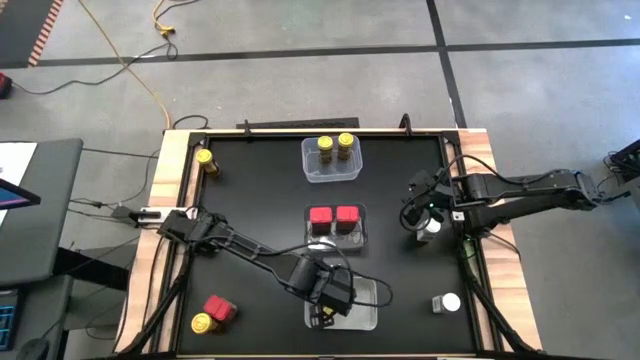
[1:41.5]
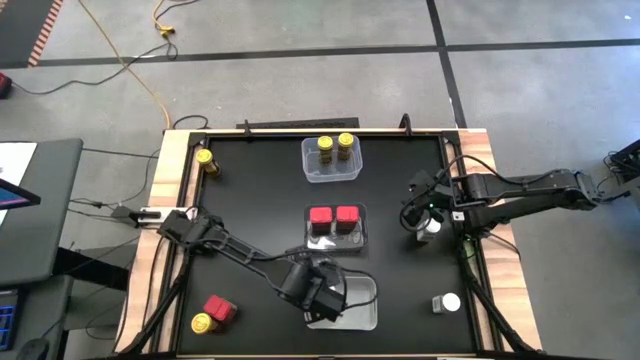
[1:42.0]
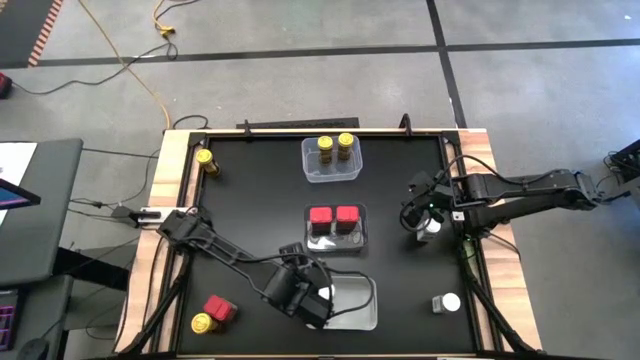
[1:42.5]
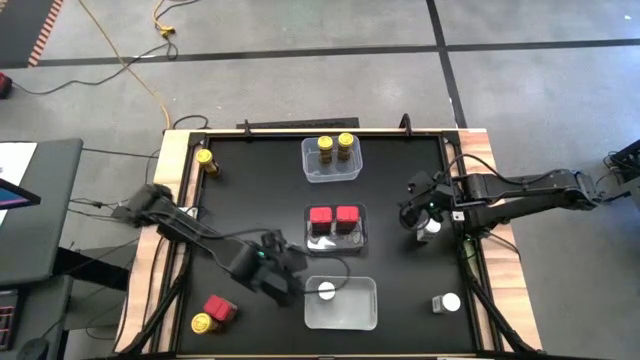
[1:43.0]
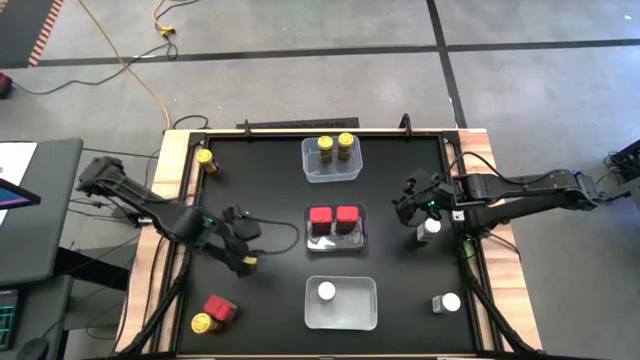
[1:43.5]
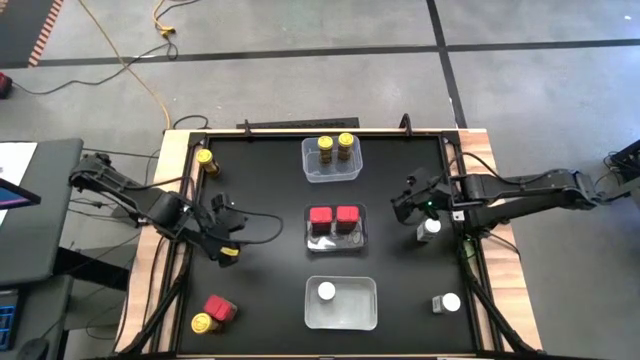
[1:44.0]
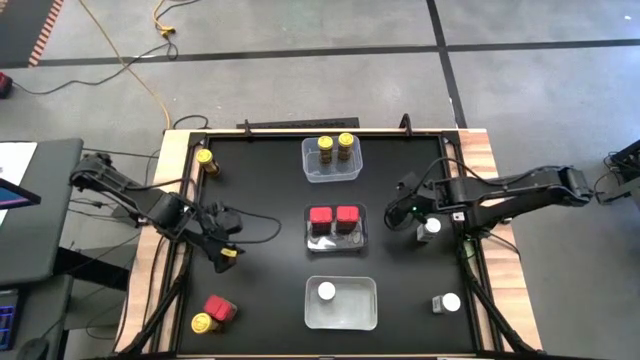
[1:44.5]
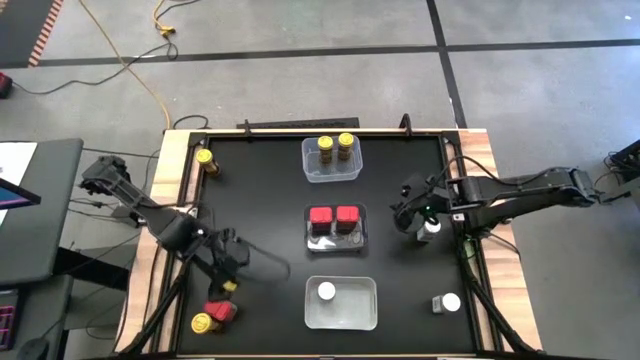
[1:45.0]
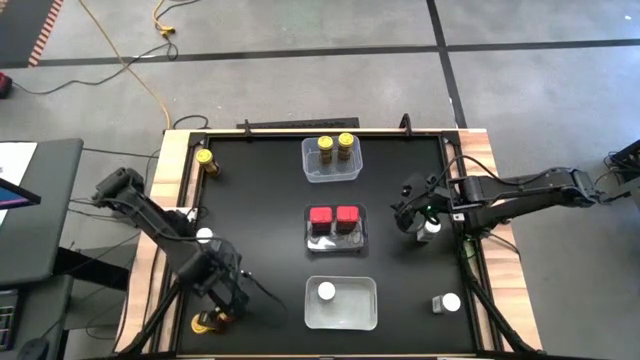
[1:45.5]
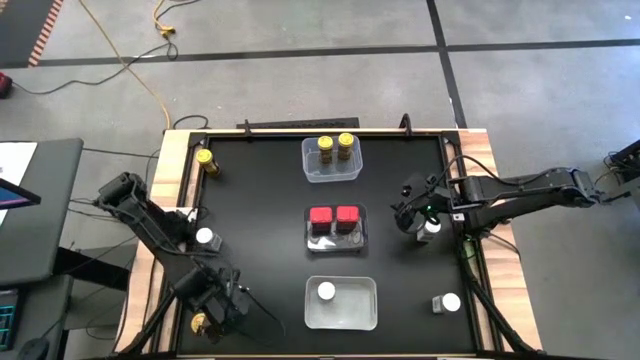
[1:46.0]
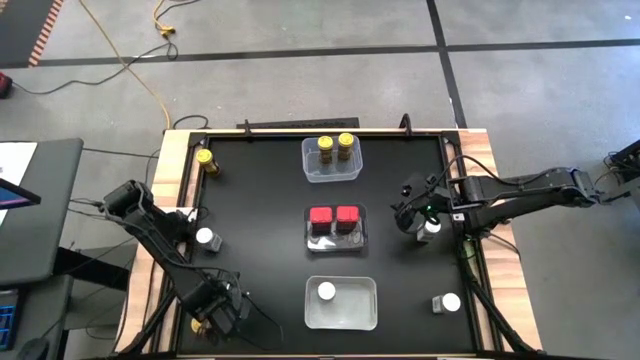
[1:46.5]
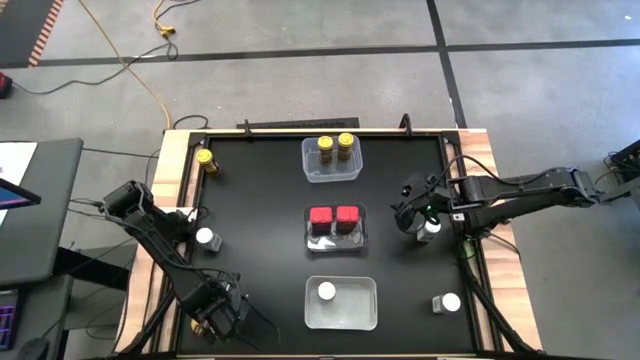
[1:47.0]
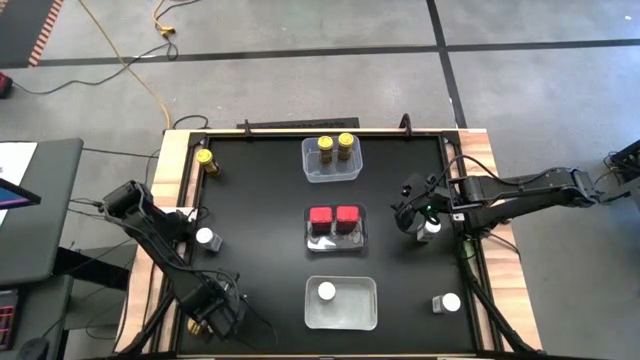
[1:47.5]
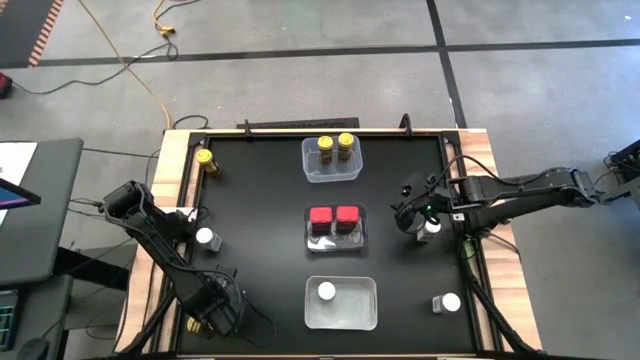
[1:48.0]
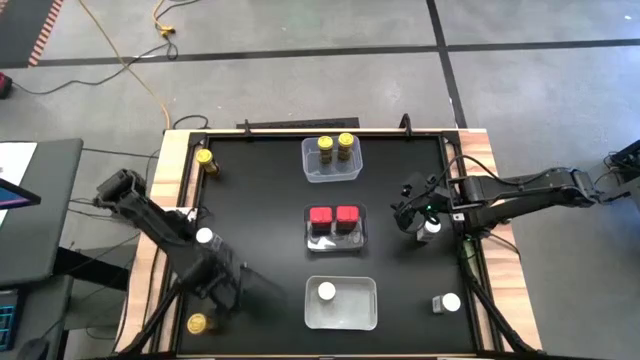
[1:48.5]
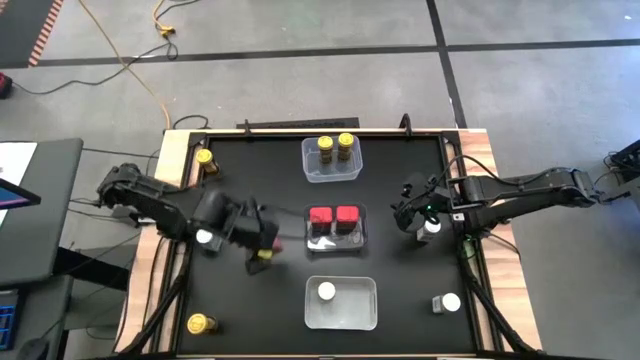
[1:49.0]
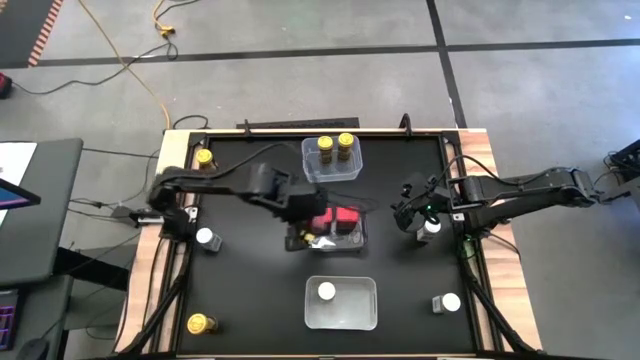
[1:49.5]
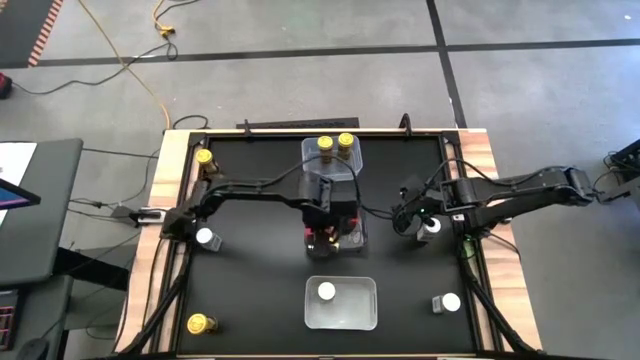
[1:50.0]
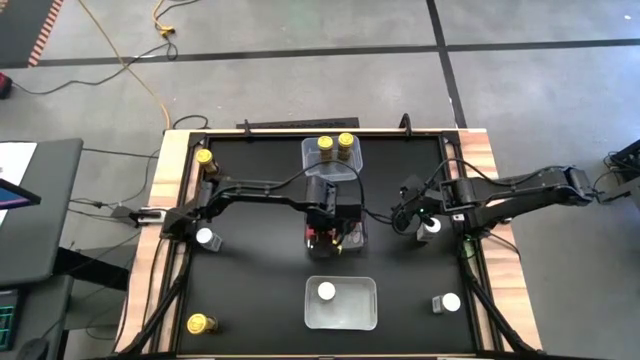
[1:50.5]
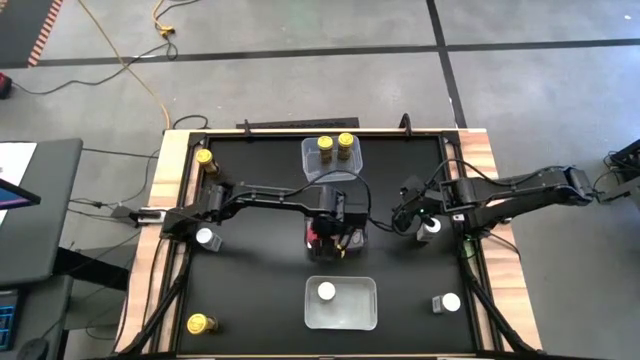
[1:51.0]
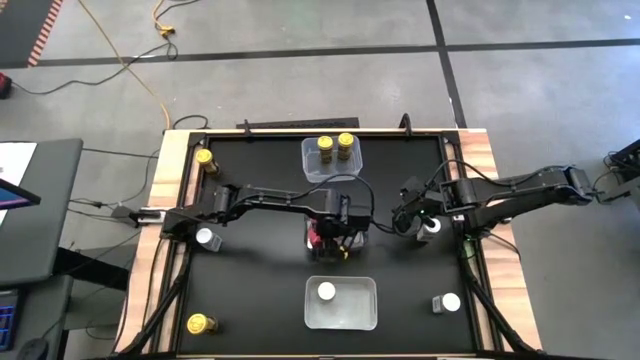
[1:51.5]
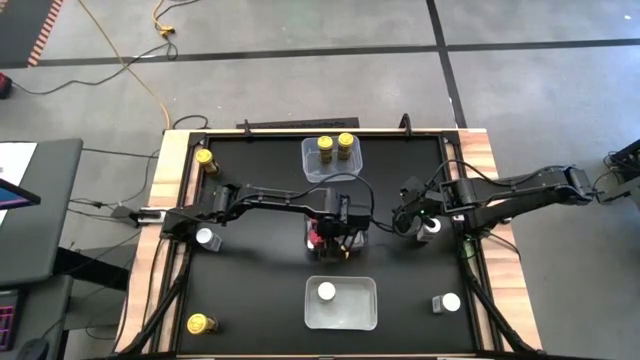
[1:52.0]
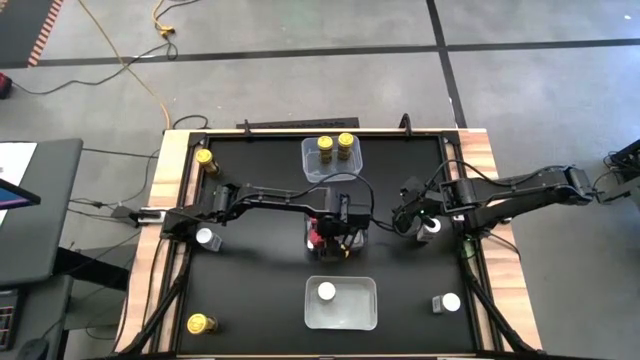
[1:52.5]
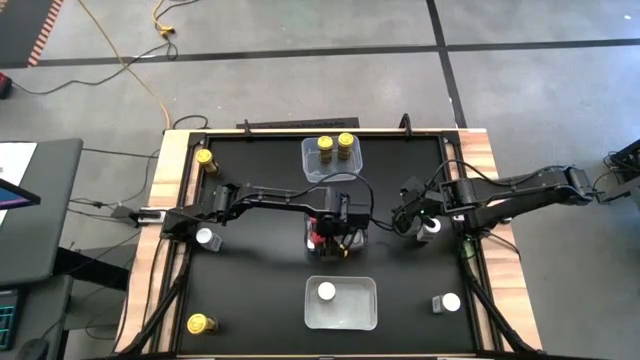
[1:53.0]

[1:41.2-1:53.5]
Task: Sort spices by type
Put the red seasoning can into the black bin

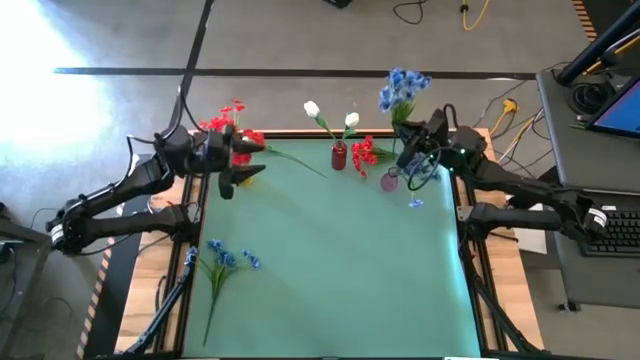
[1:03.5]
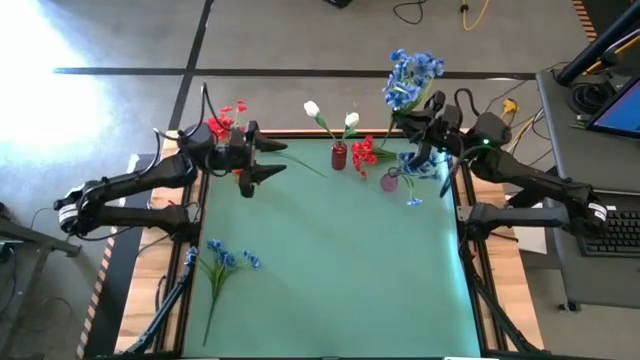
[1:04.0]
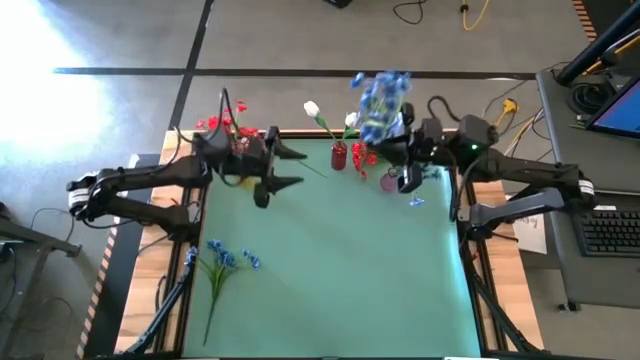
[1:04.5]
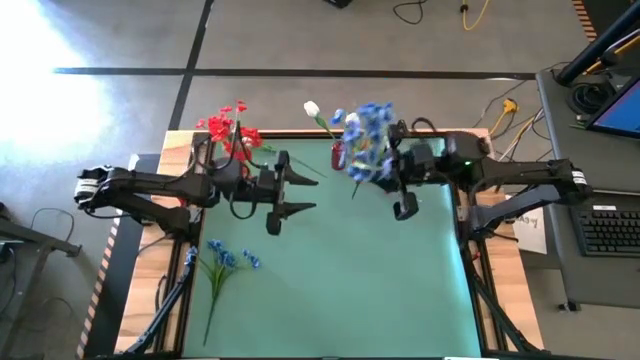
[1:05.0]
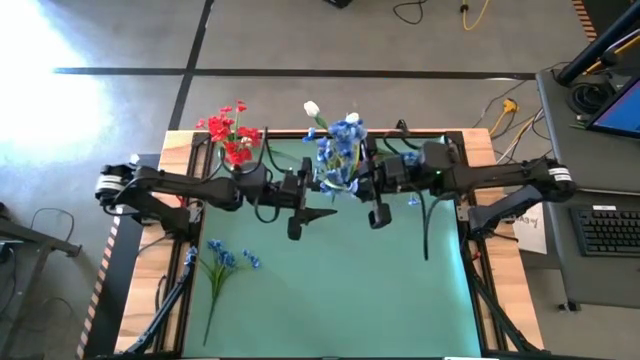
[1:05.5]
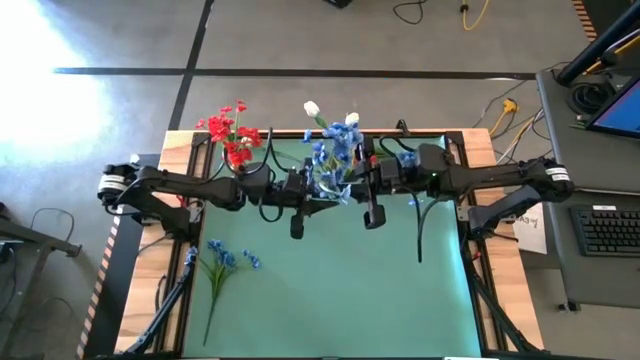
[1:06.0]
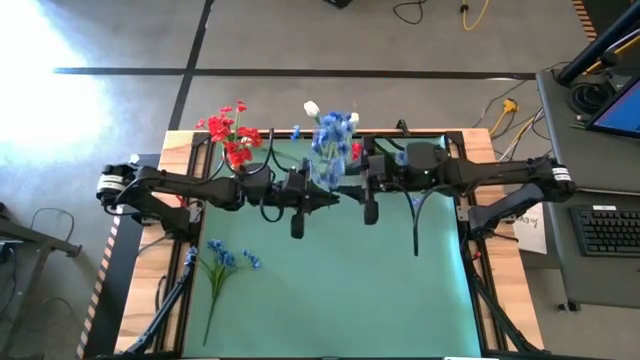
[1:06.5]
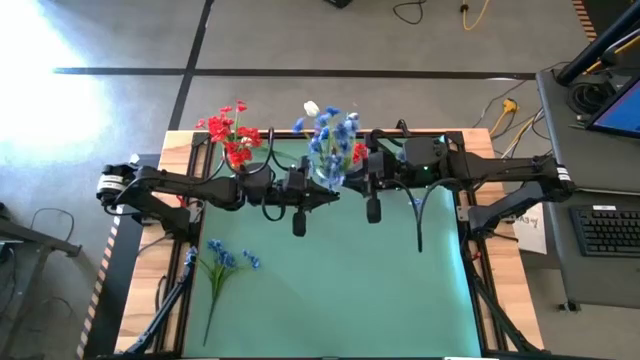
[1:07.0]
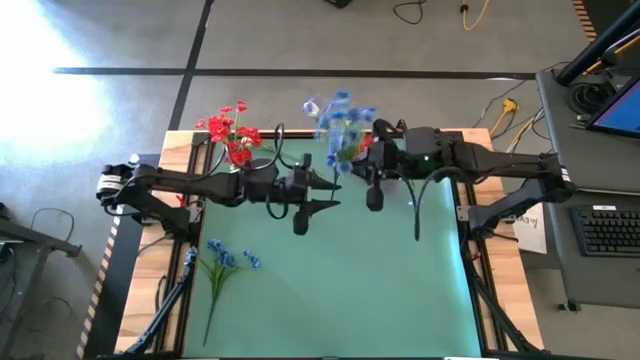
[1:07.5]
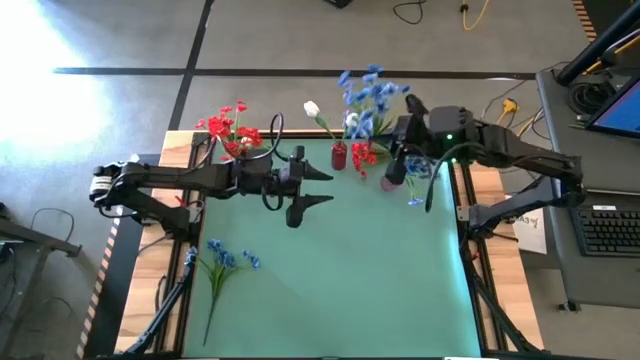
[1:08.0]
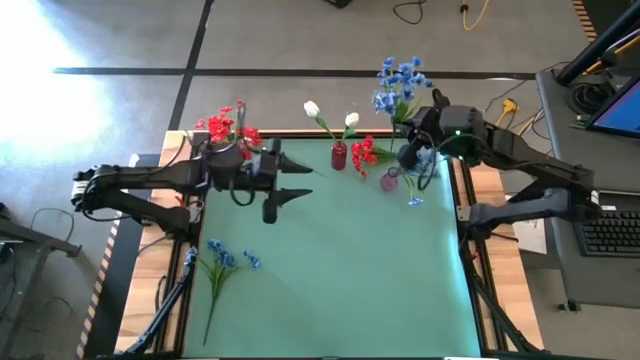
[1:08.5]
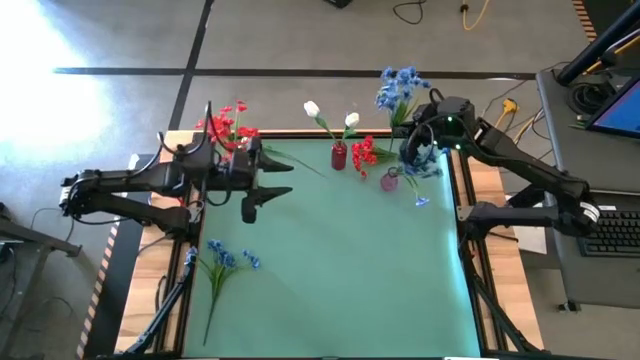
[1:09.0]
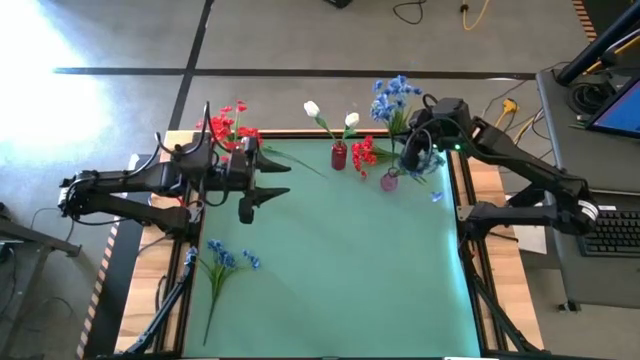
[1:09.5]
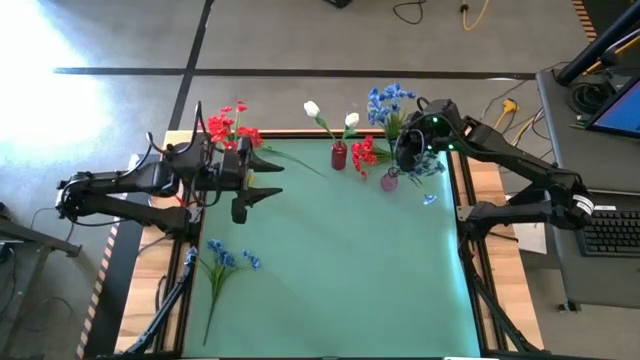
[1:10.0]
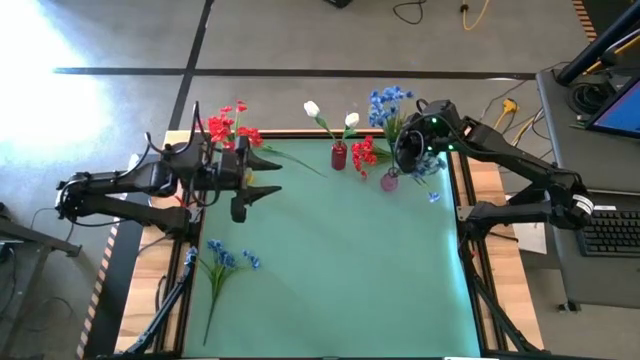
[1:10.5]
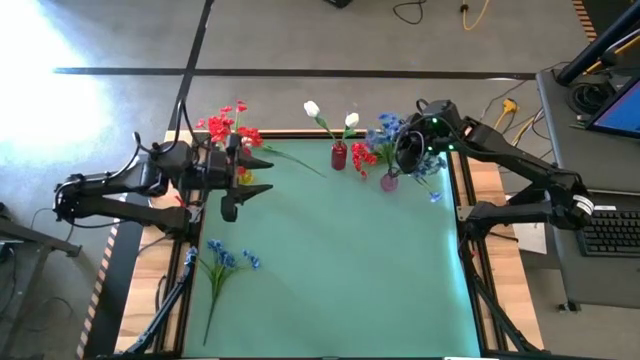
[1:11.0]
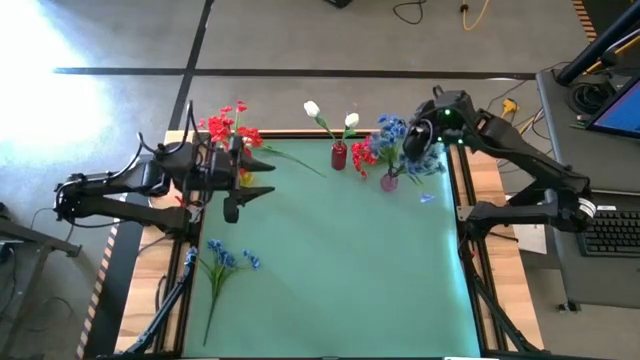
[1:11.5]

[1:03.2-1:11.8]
Task: Sort flowers into vase by color
Put the right blue flower into the violet vase
